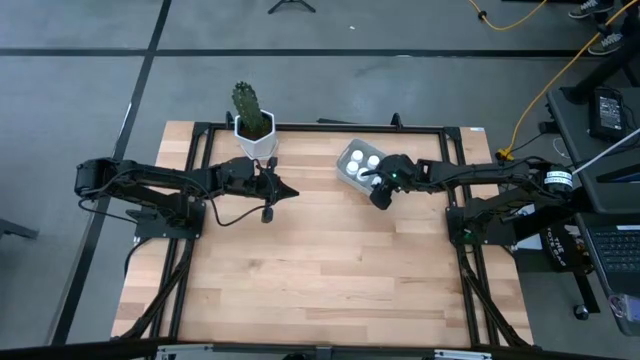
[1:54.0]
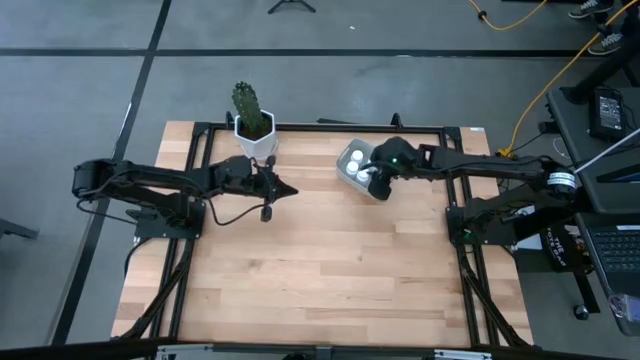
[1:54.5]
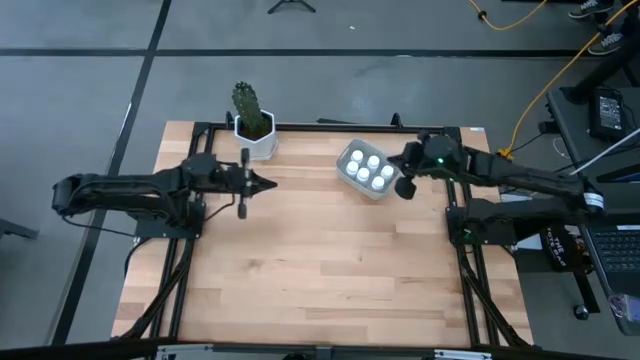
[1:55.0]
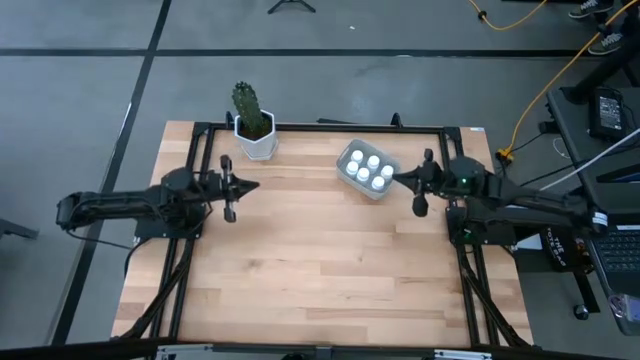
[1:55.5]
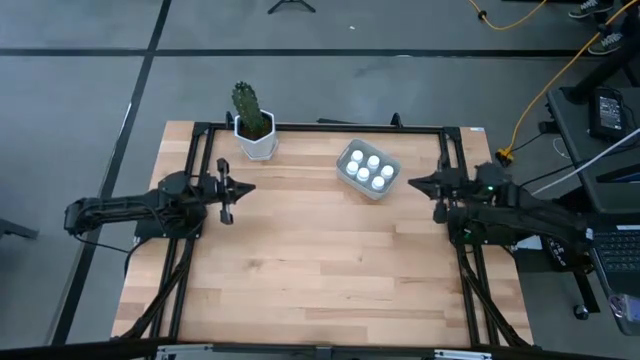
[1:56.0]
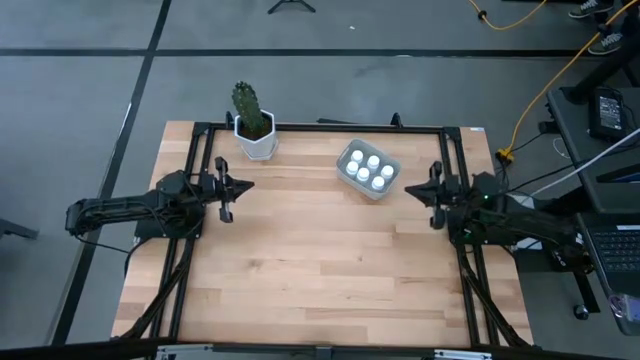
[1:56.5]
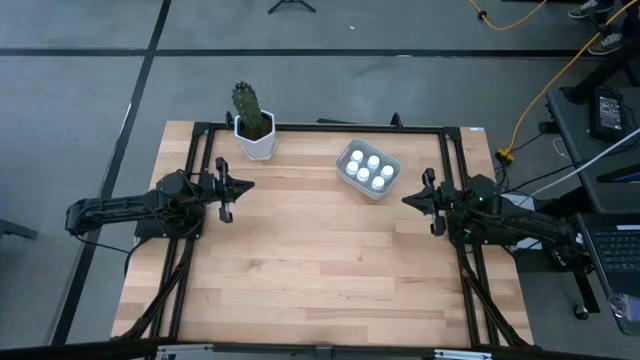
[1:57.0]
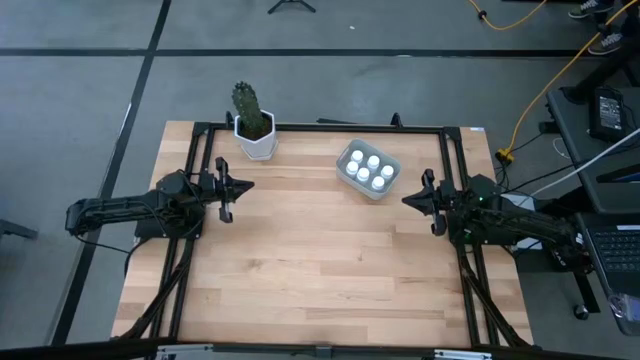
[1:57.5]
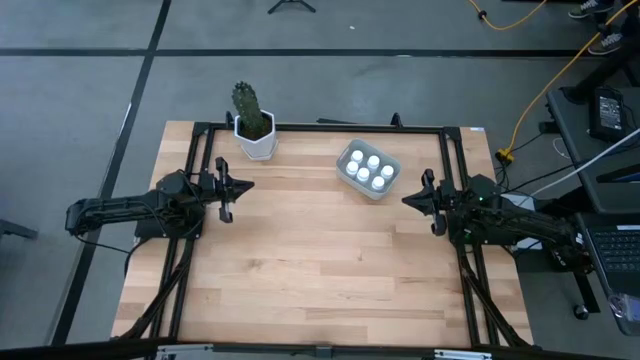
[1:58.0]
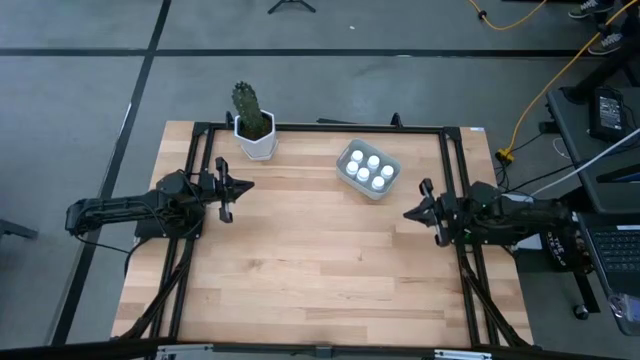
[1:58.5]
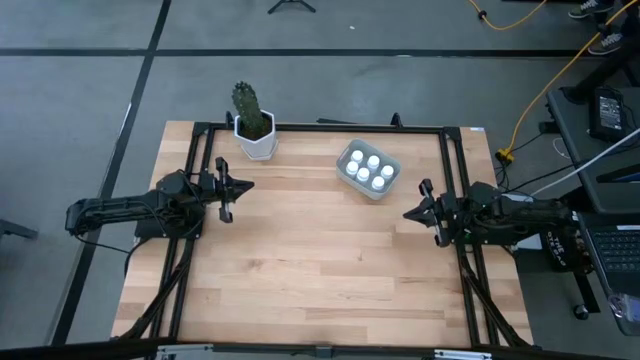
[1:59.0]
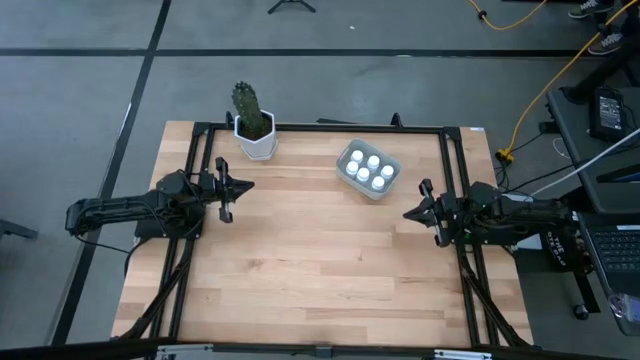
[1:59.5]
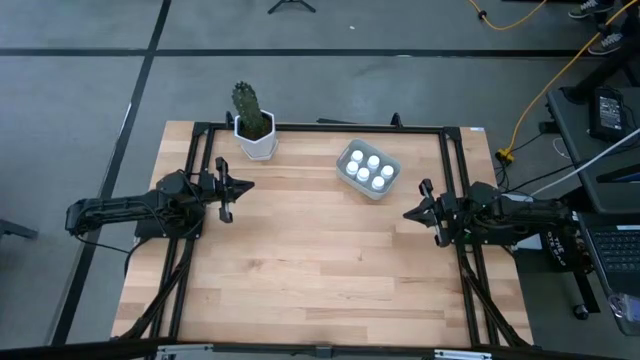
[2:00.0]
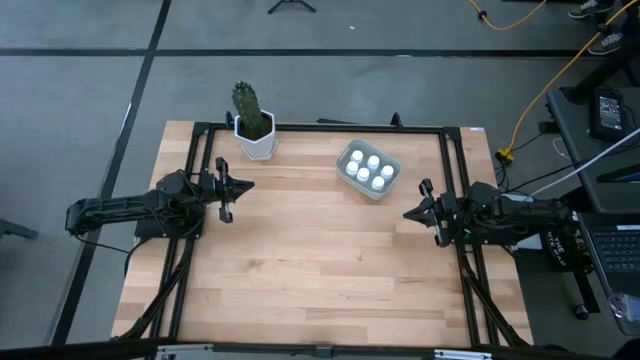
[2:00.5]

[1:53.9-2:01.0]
Task: Pick and place pill bottles into a basket
Return to Home Position

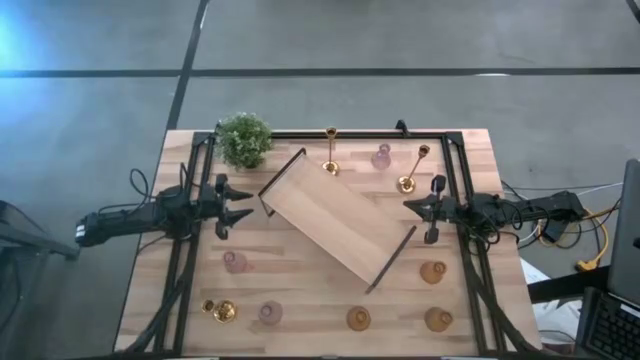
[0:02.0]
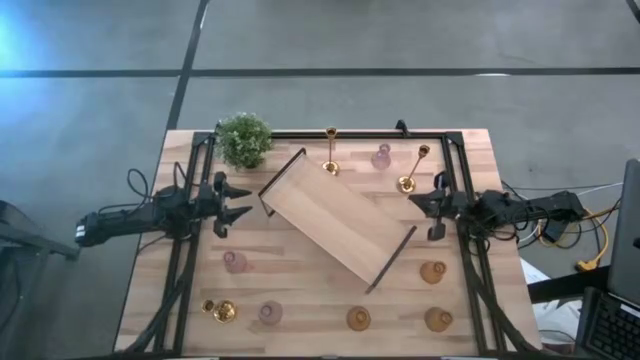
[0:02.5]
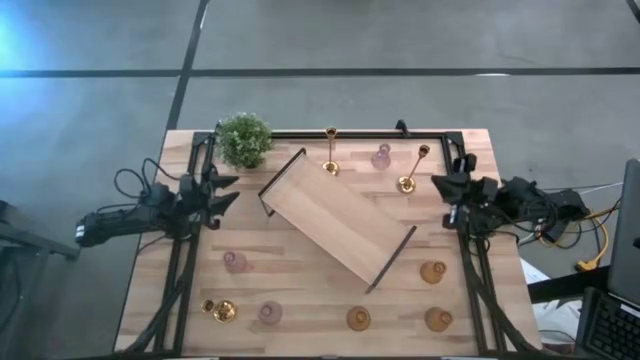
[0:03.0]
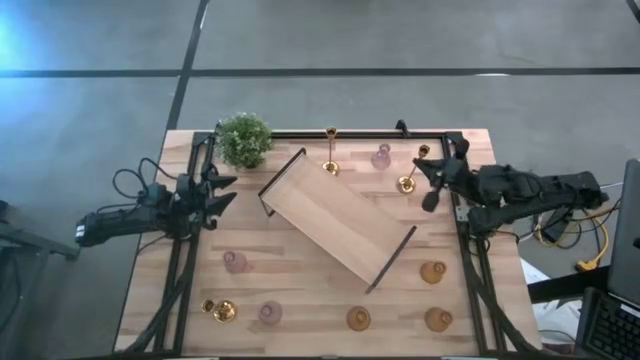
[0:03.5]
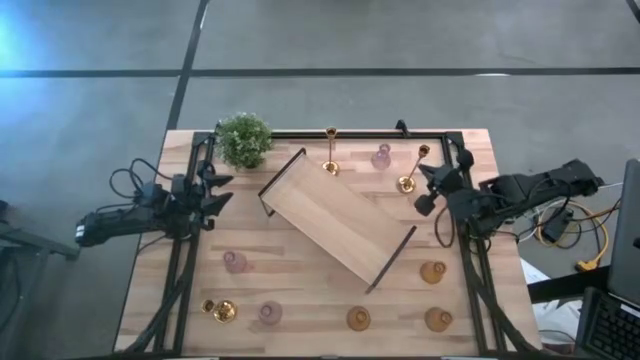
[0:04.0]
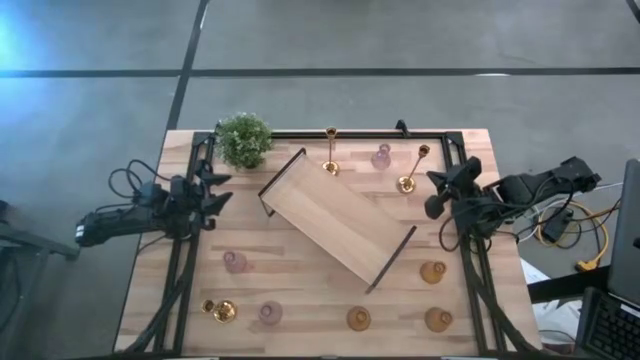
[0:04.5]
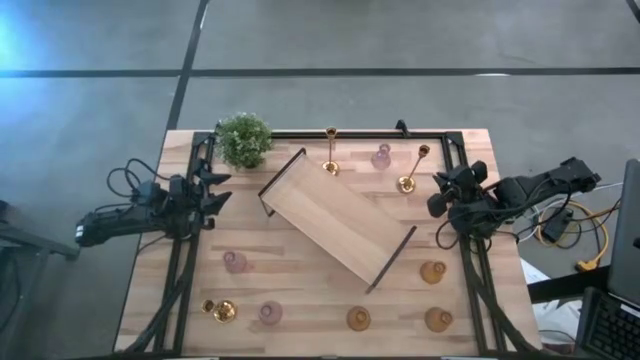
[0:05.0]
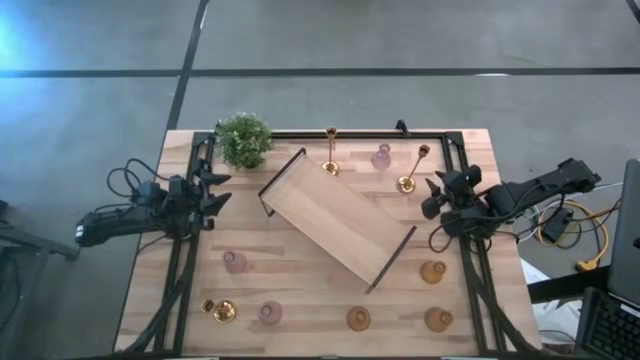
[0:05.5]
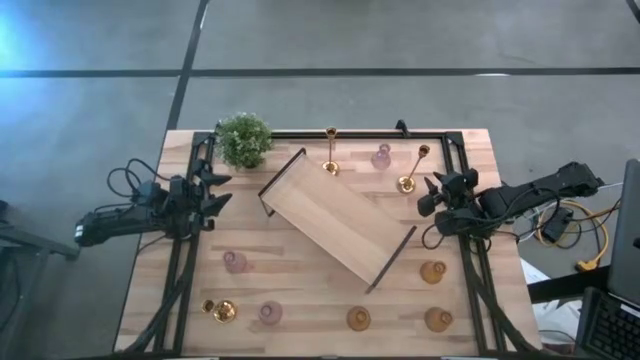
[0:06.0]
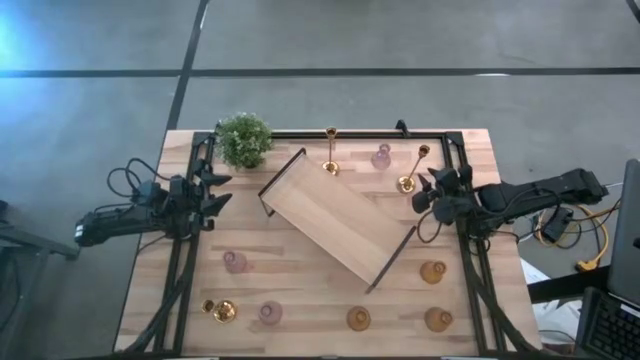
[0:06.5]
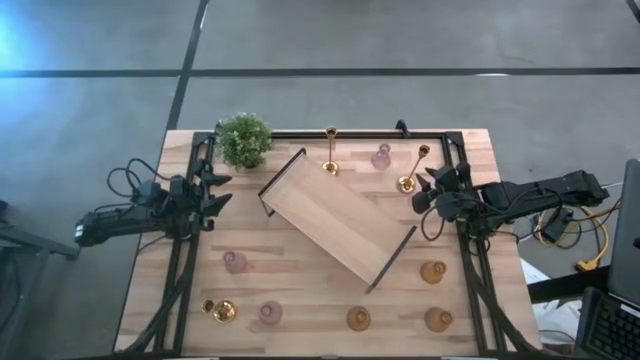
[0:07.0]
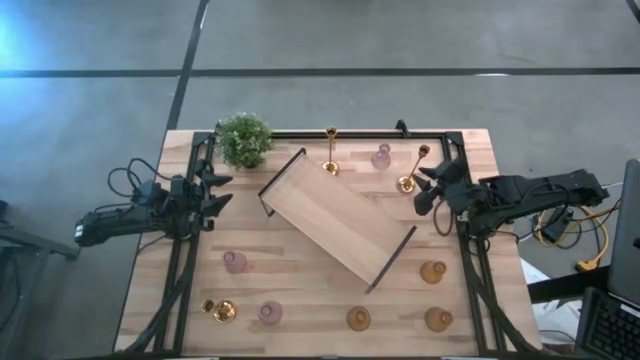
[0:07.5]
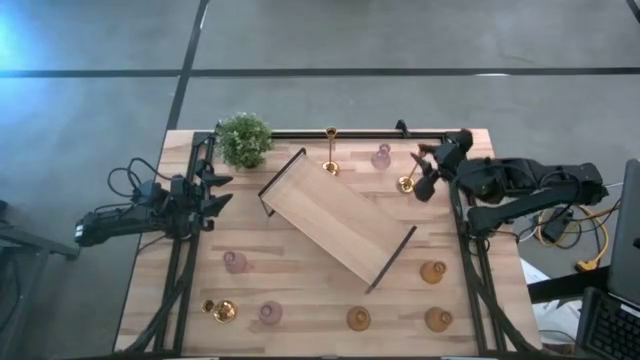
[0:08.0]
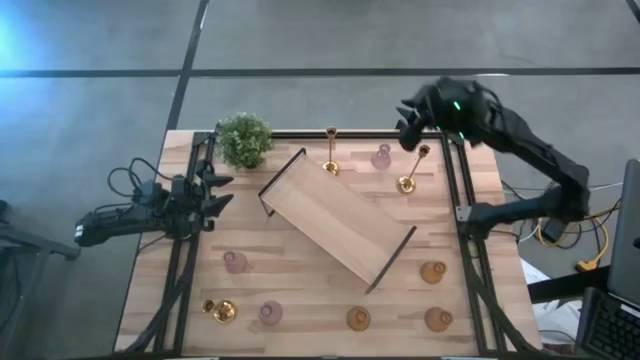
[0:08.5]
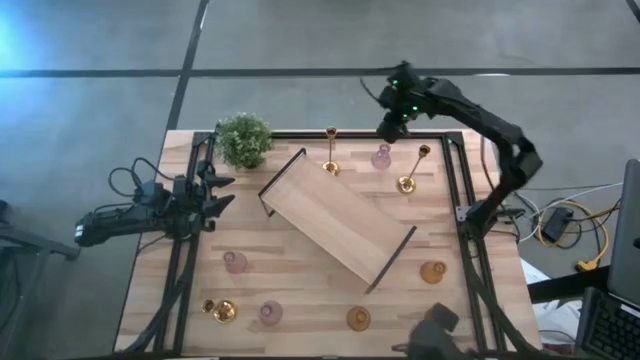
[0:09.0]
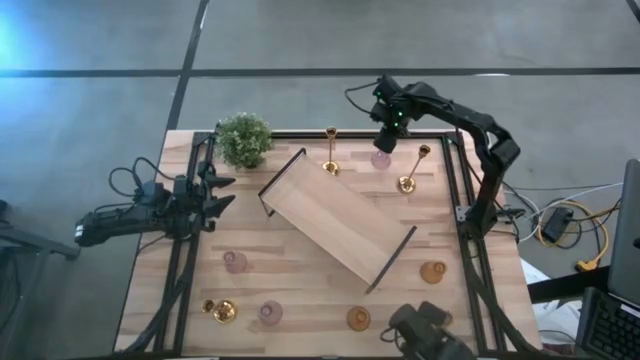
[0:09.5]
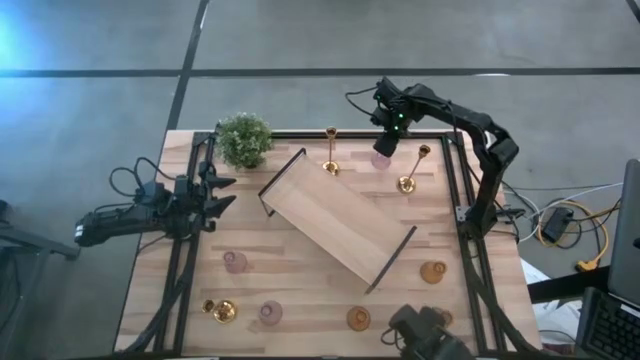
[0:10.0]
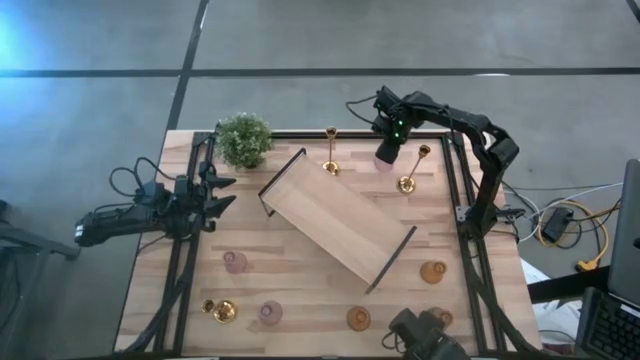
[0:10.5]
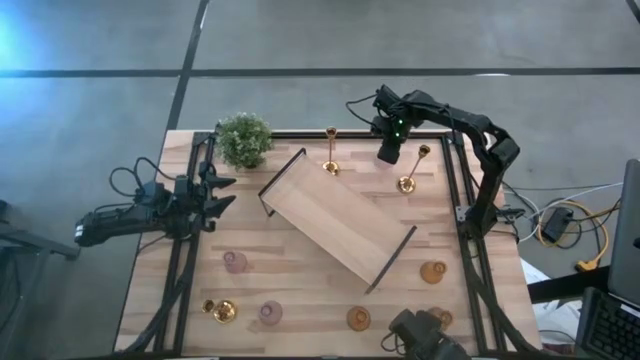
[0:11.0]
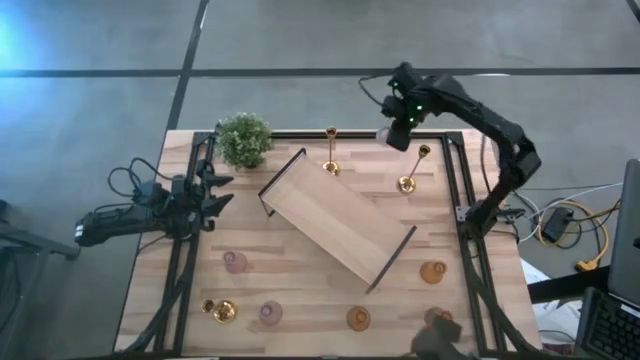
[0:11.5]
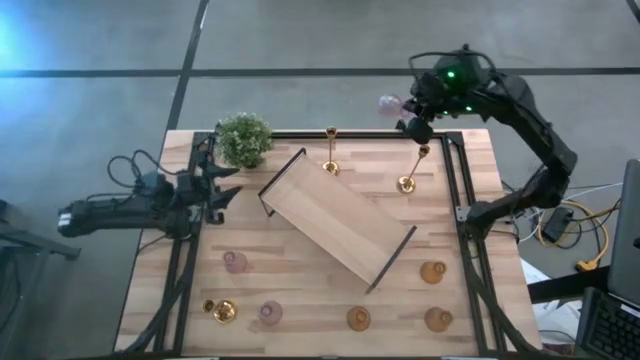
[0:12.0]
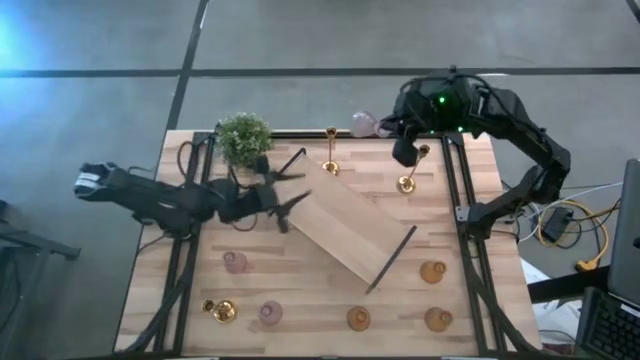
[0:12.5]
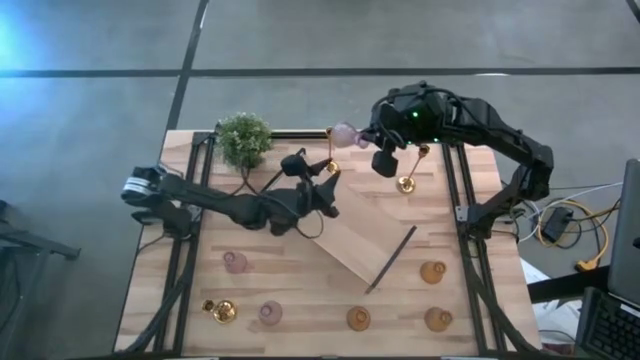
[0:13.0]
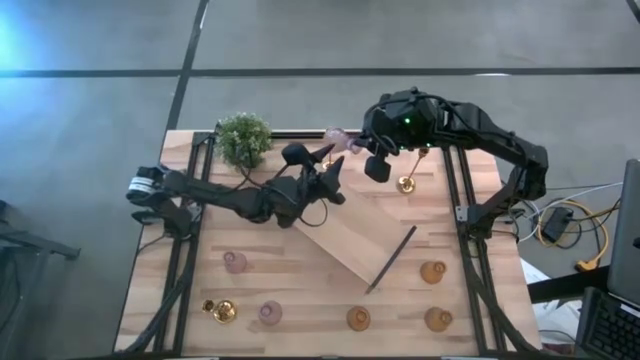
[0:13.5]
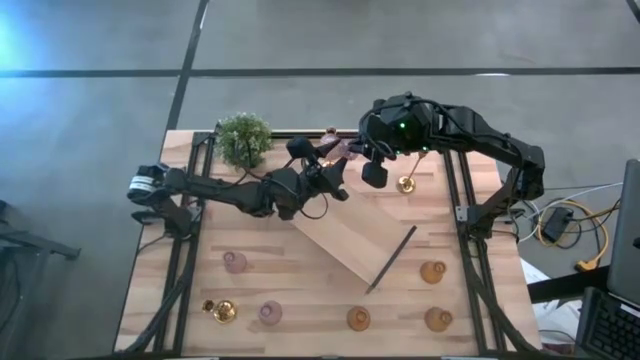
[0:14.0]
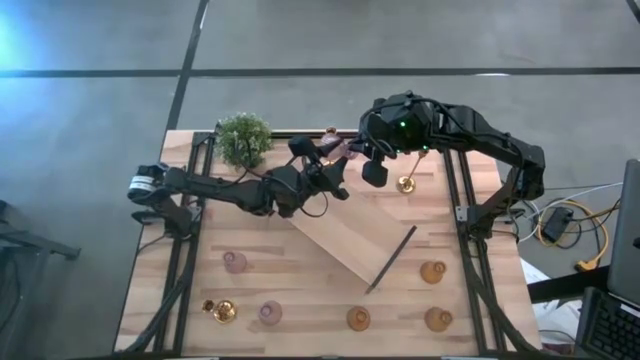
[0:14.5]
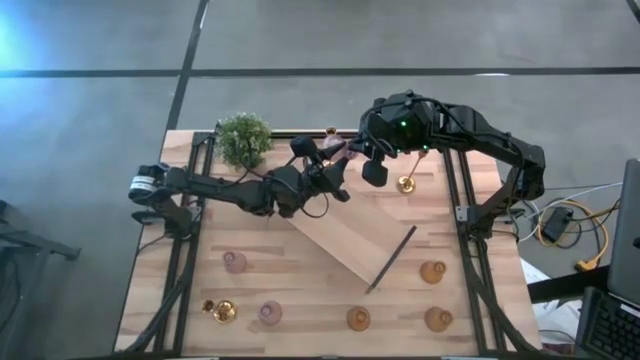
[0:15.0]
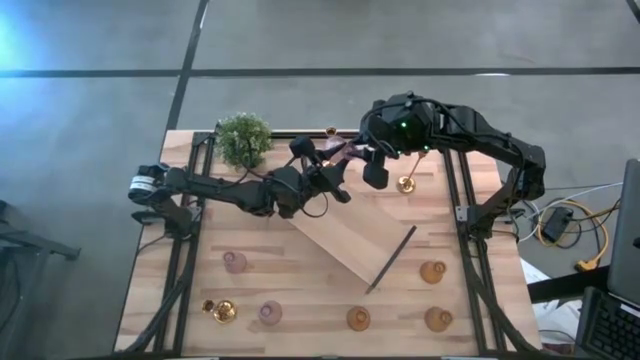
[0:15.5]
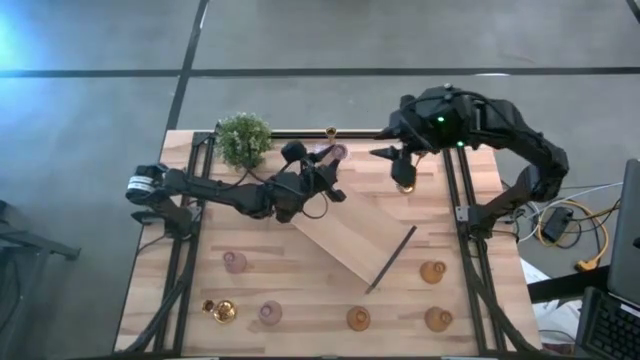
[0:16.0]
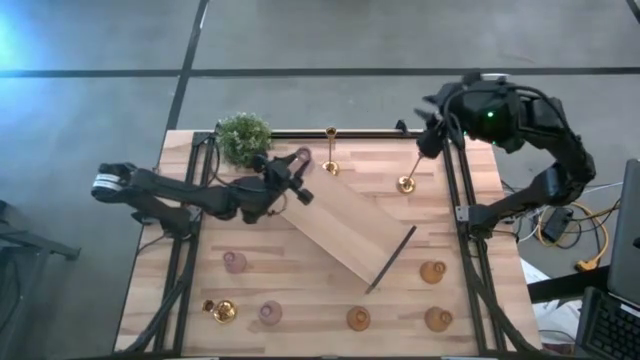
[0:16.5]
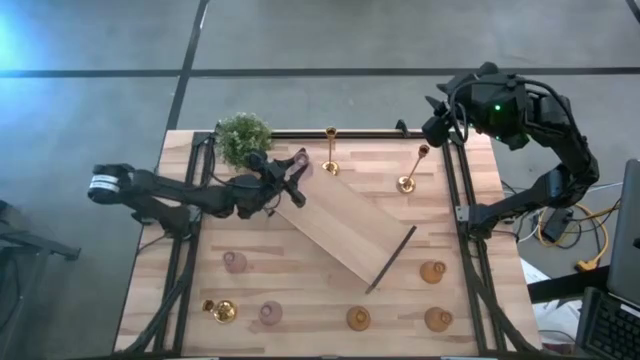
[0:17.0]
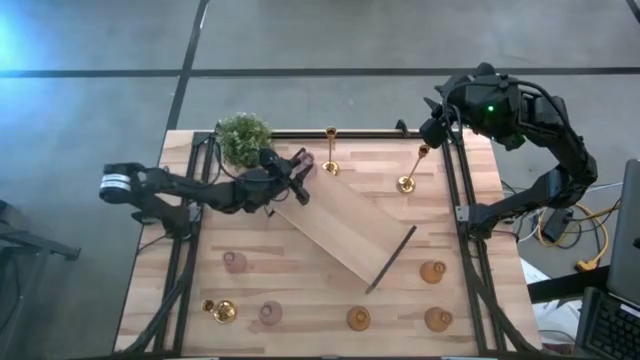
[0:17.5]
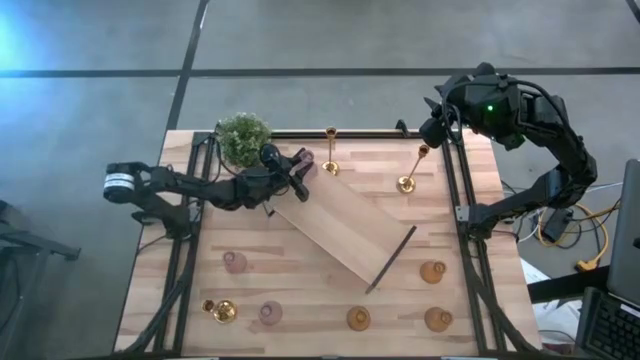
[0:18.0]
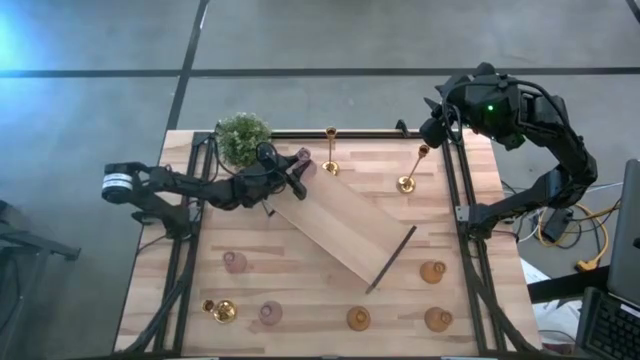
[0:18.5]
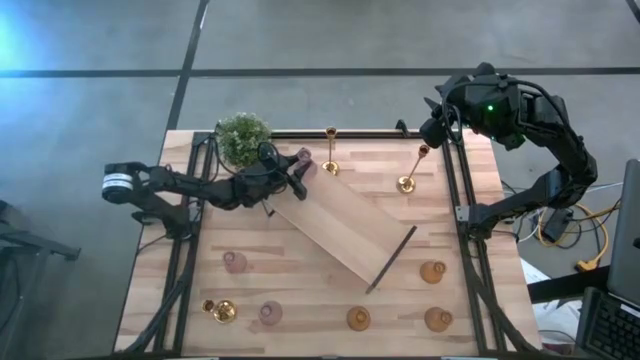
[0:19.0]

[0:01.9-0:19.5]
Task: Pick & Place candle stick holders
Put the top pink candle holder on the shelf
